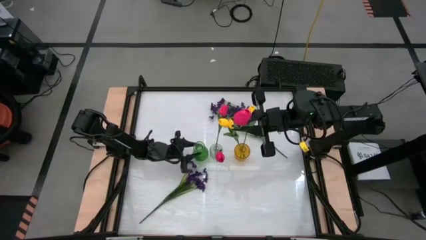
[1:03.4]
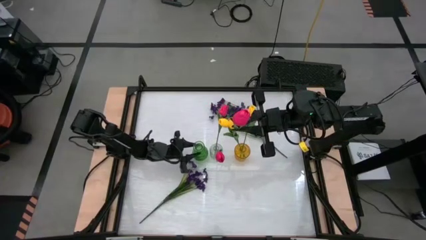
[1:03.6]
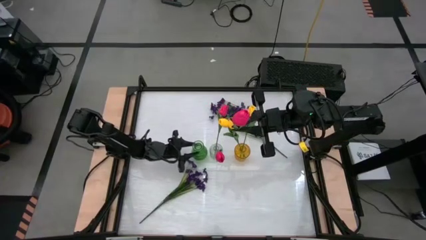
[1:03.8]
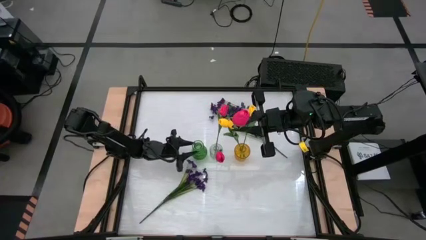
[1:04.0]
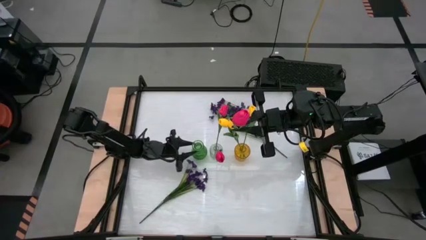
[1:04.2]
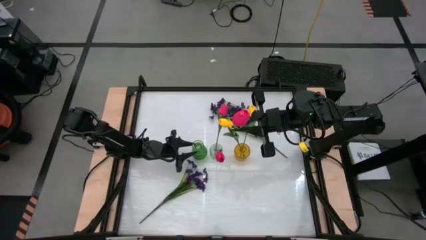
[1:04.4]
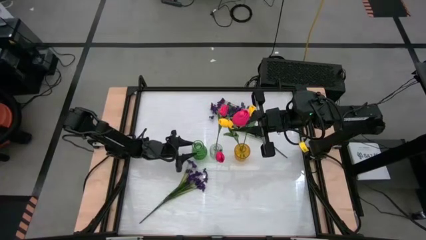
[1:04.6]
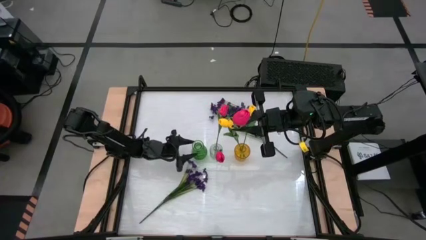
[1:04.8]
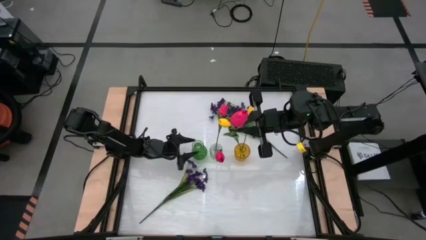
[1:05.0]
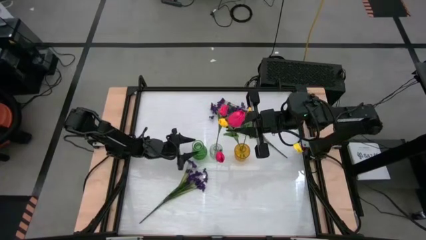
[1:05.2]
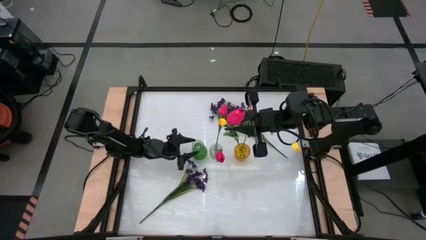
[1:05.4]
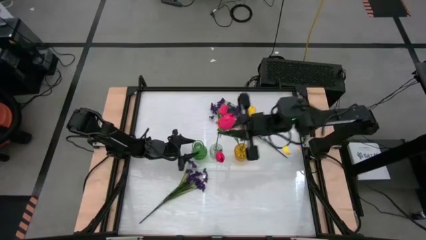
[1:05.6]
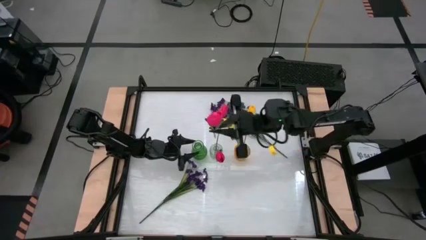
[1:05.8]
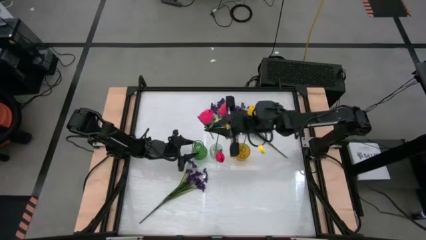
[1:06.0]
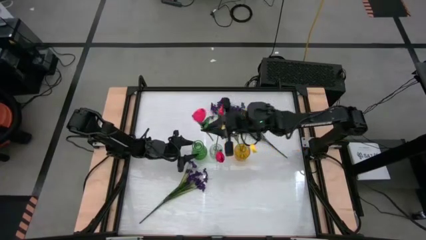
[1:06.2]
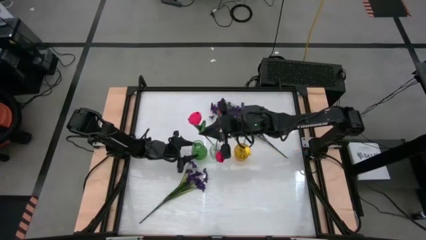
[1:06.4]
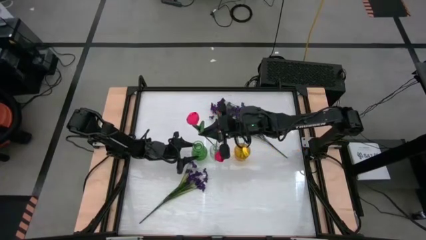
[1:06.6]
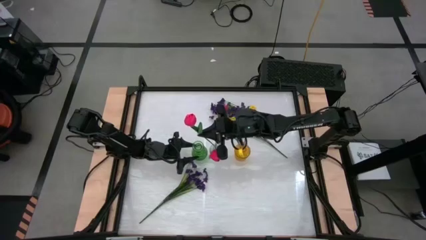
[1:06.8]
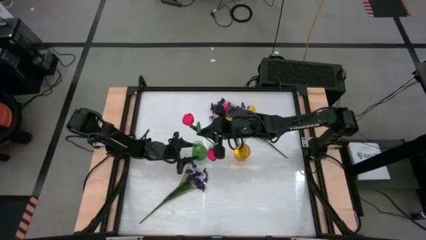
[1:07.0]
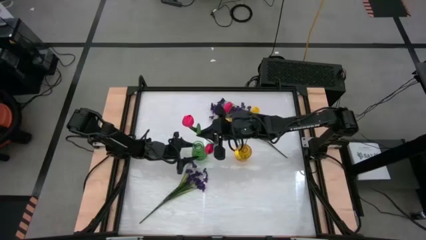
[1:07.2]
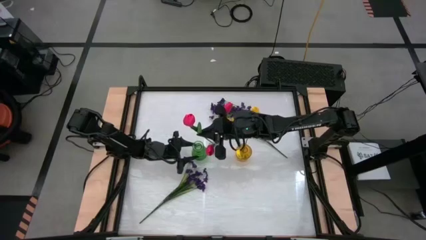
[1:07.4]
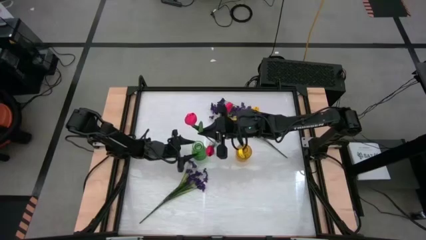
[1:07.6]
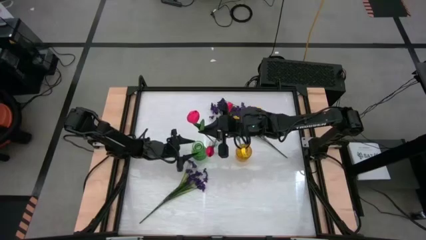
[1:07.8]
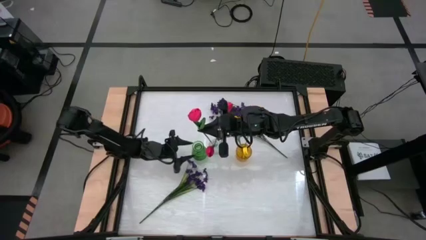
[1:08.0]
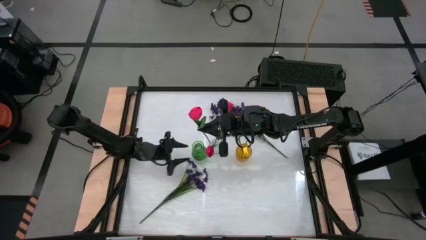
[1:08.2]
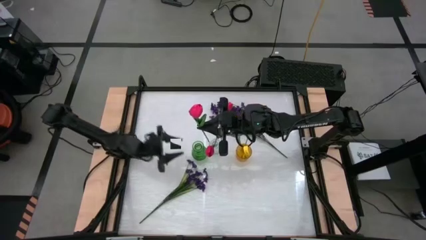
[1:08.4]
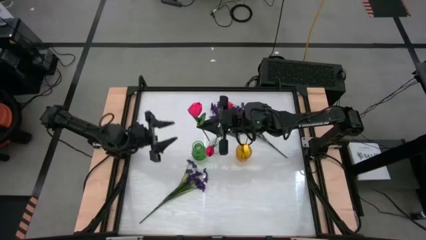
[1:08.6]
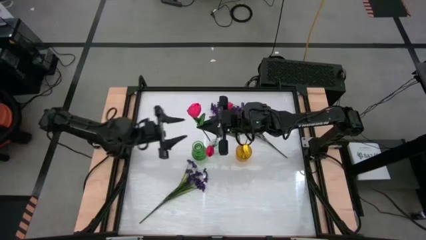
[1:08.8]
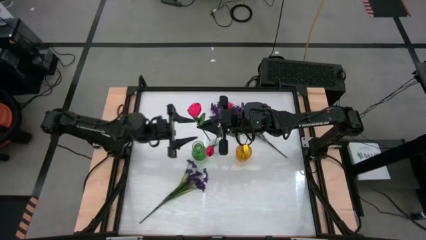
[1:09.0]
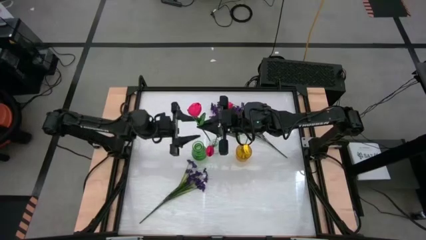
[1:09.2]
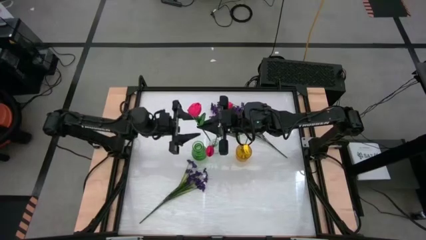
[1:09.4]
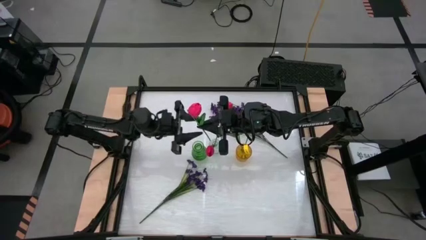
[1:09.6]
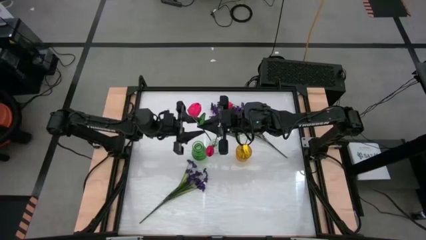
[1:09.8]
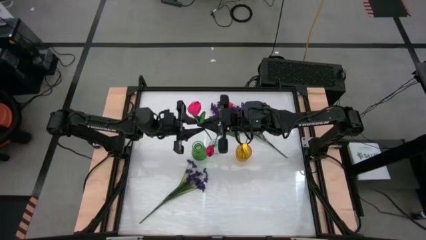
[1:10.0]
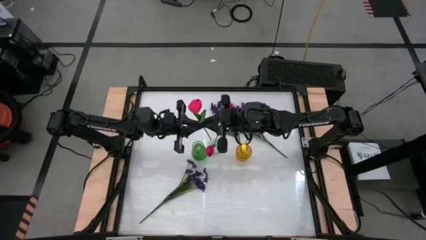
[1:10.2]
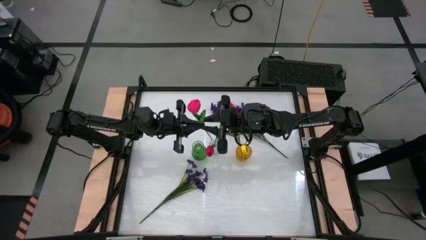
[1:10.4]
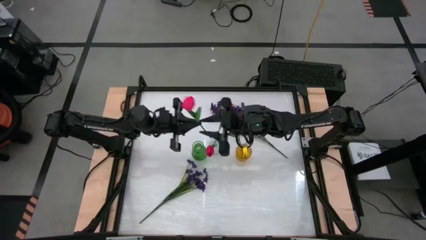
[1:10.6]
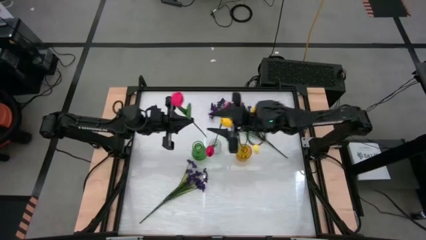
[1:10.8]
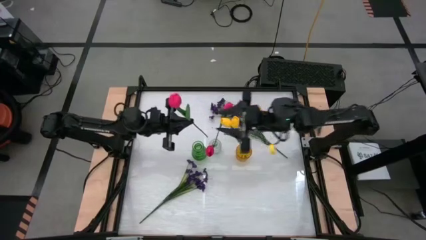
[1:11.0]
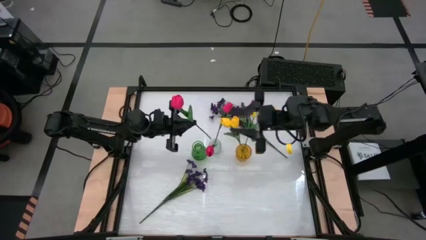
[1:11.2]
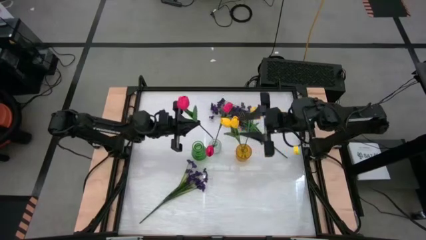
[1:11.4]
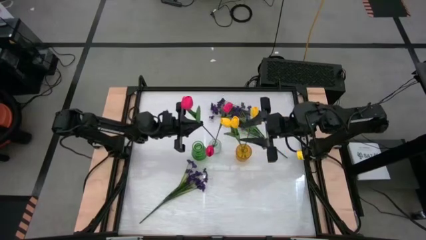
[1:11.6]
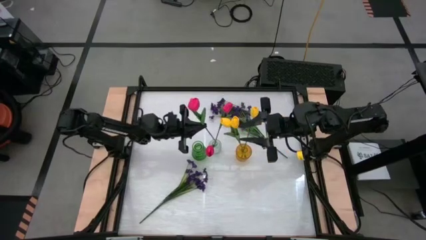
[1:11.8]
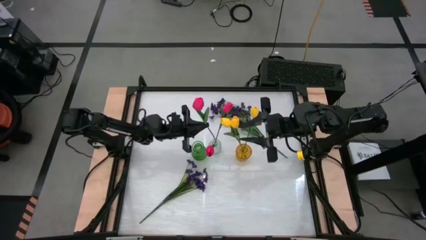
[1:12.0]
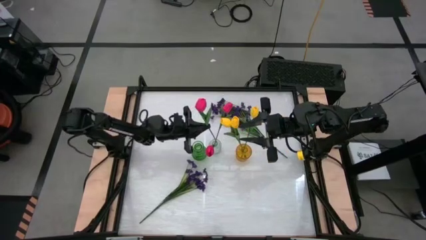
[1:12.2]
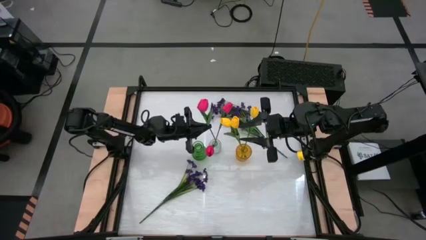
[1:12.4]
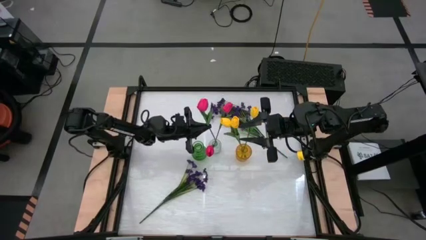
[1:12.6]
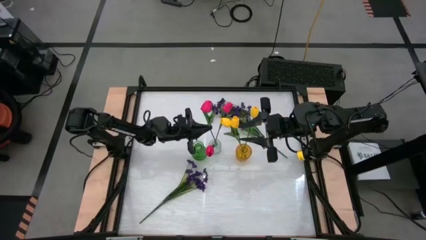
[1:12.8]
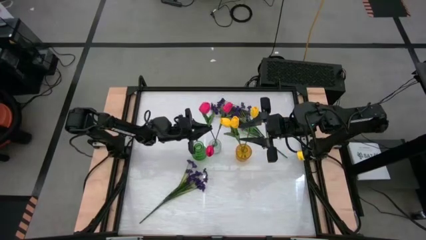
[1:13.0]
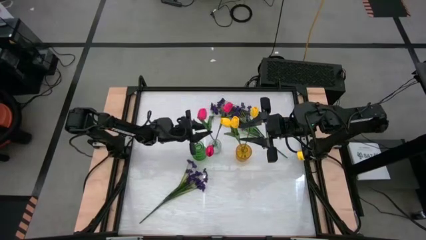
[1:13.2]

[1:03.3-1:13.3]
Task: Sort flowers into vase by color
Put the red tulip into the transparent vase

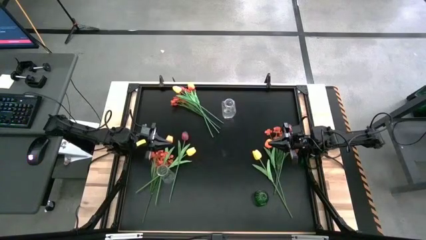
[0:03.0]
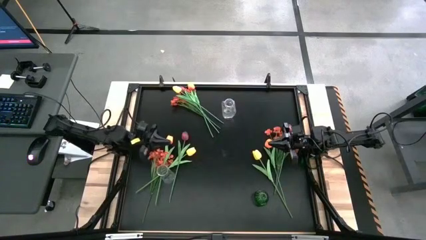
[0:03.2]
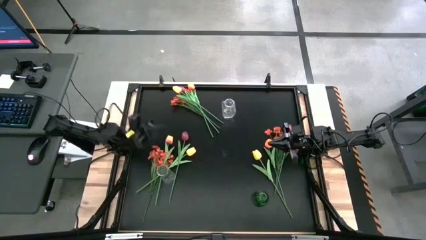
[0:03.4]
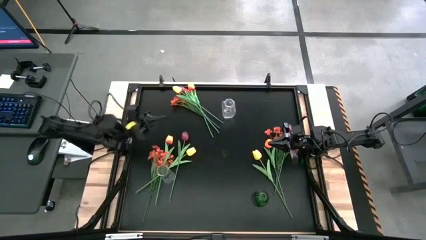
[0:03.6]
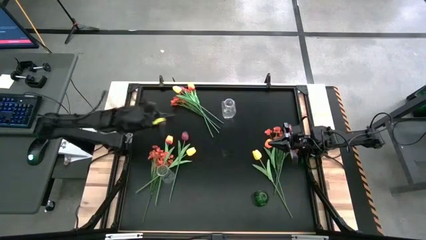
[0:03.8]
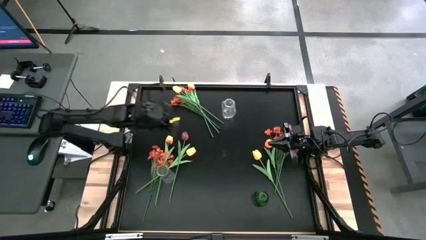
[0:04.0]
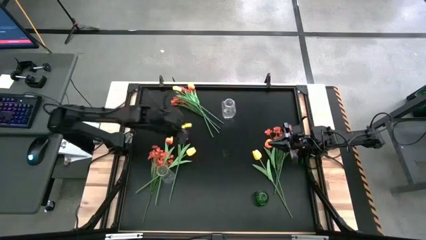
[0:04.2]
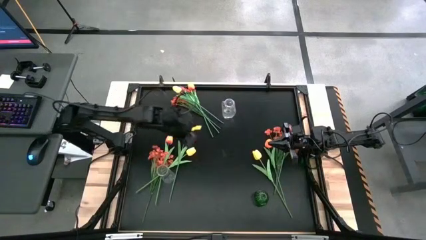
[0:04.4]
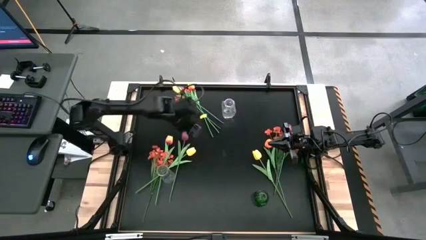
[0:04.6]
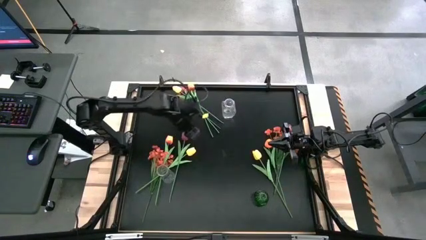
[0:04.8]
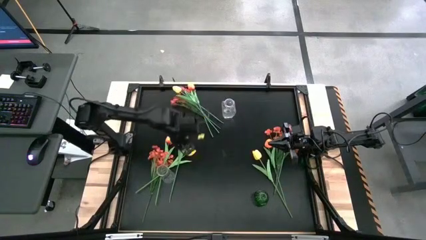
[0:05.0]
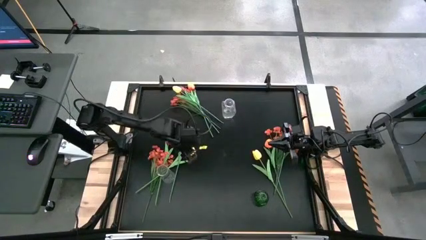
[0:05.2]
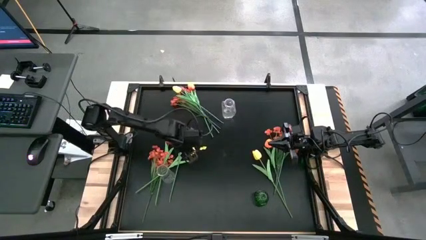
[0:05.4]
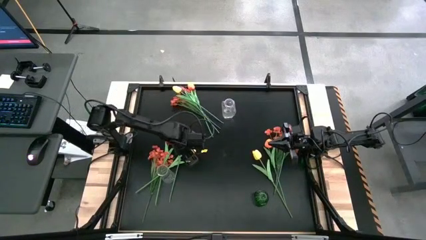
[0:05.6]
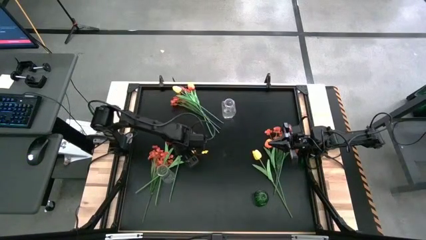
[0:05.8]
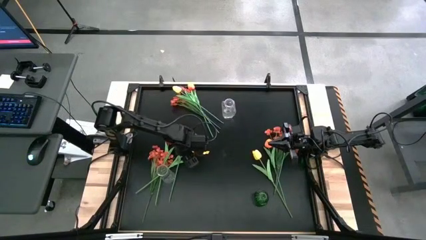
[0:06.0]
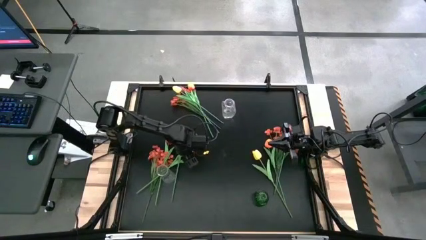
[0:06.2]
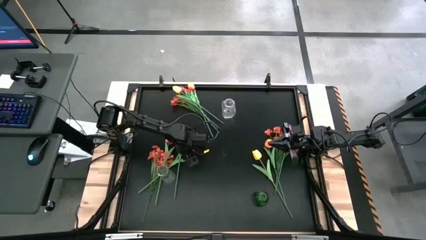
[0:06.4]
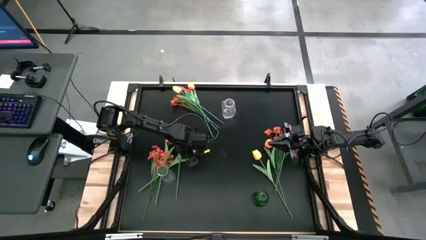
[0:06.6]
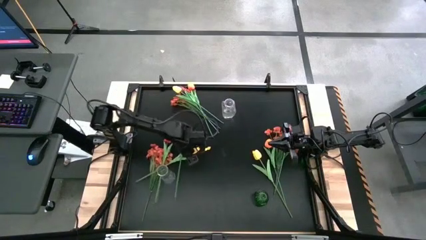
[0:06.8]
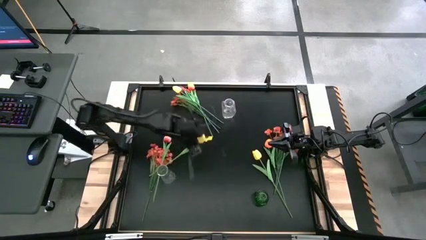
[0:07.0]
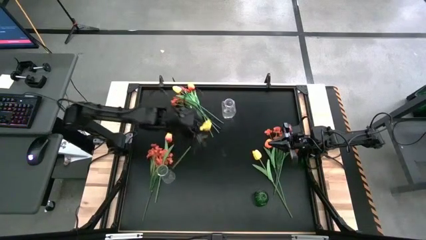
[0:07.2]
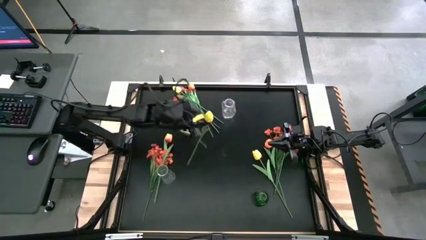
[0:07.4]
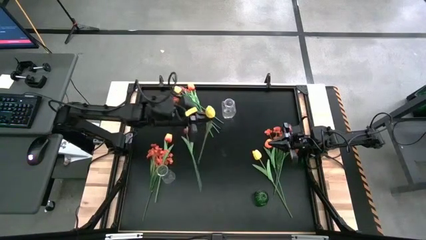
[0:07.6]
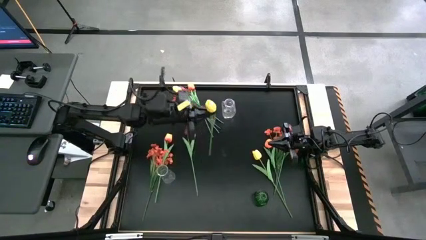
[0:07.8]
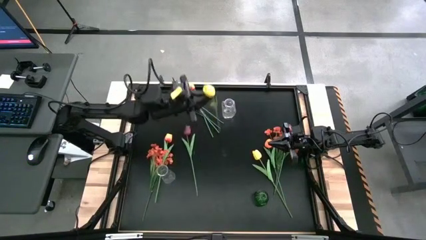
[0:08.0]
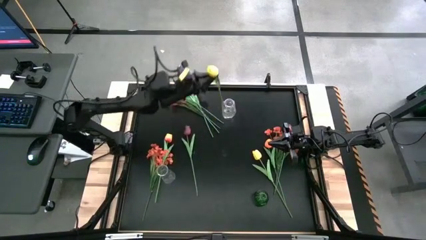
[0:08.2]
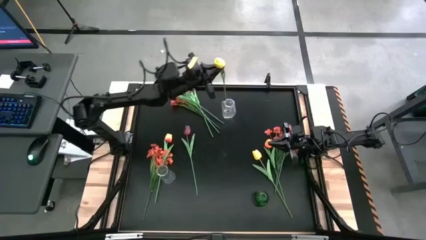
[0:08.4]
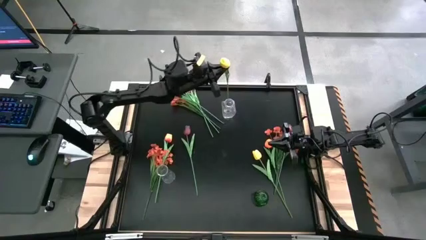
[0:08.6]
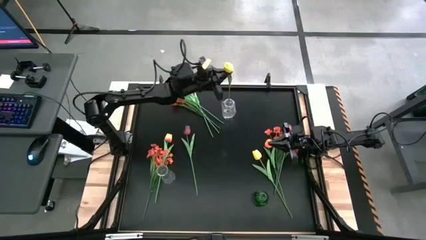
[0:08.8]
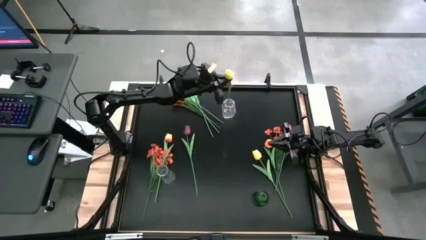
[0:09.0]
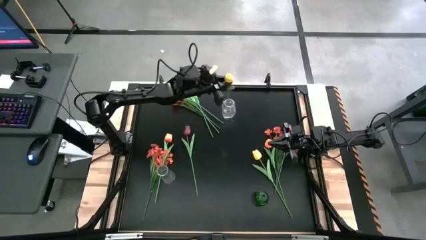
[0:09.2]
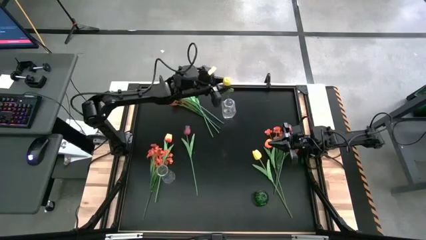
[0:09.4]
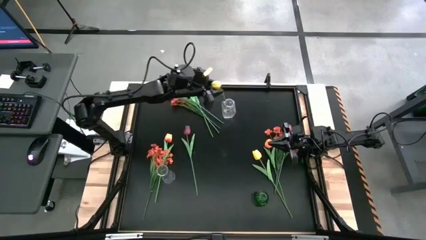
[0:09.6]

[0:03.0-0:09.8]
Task: Sort flowers into vase by color
Put the left yellow tulip into the top transparent vase
